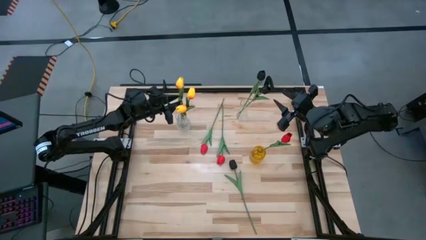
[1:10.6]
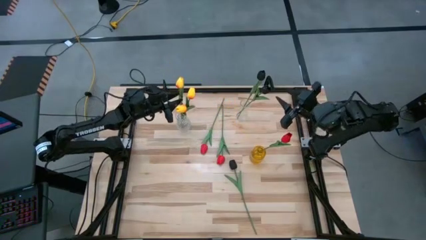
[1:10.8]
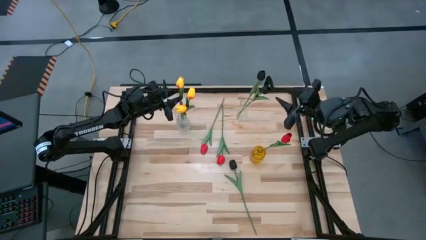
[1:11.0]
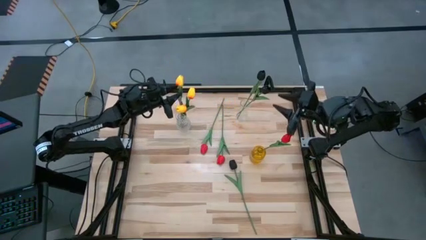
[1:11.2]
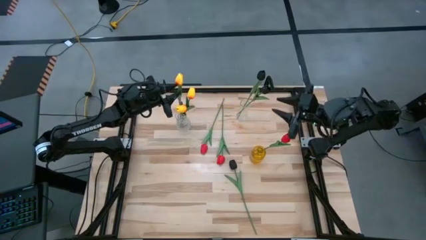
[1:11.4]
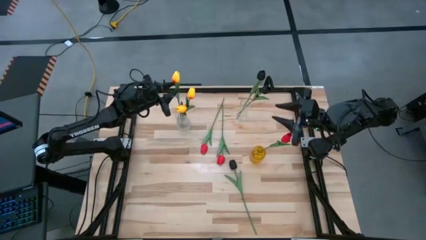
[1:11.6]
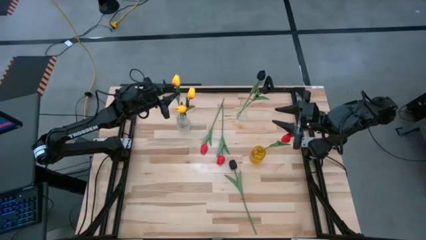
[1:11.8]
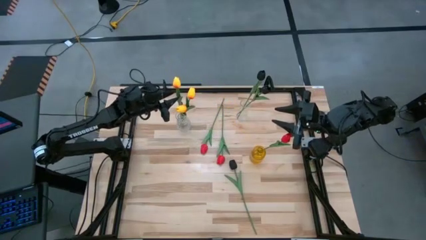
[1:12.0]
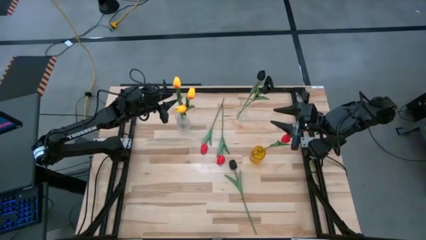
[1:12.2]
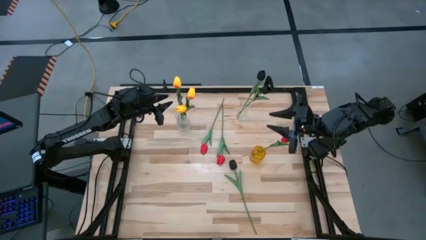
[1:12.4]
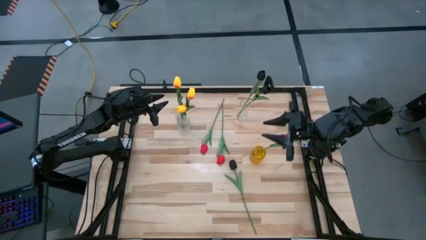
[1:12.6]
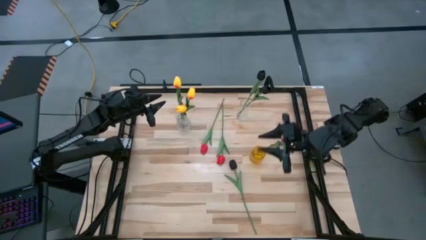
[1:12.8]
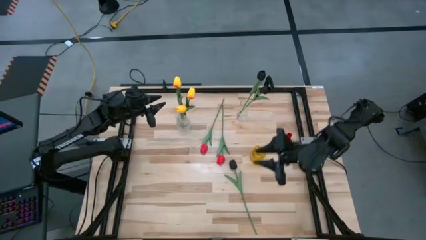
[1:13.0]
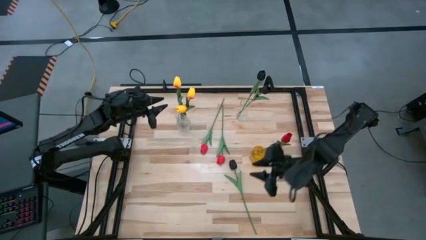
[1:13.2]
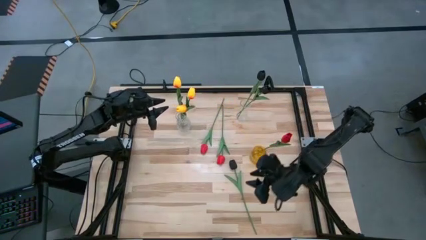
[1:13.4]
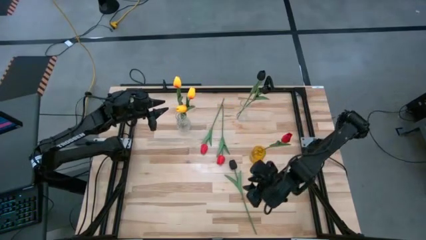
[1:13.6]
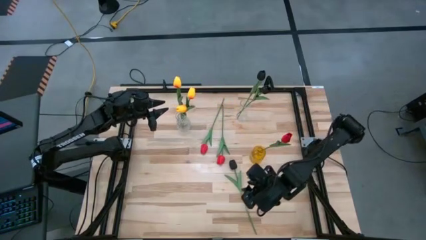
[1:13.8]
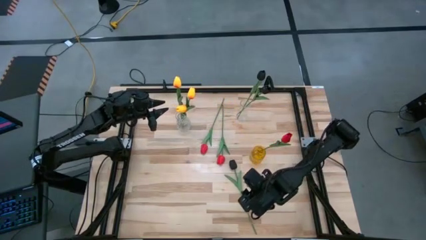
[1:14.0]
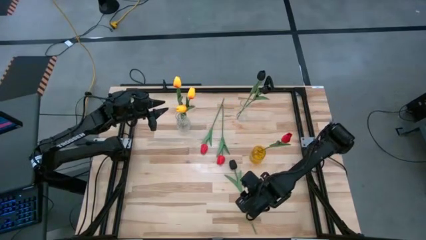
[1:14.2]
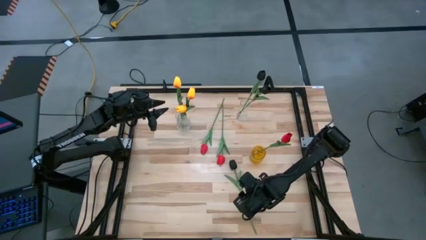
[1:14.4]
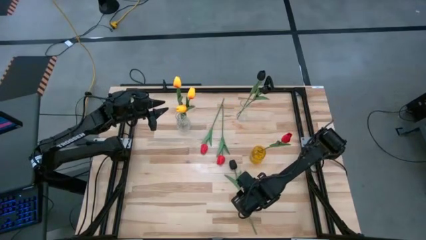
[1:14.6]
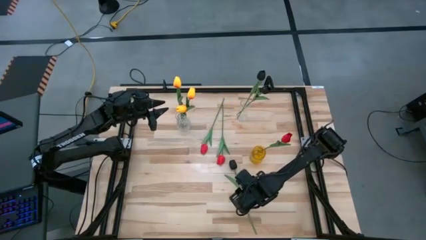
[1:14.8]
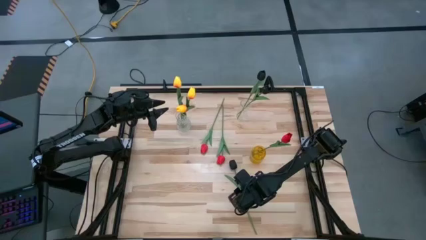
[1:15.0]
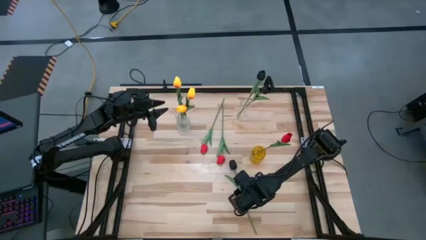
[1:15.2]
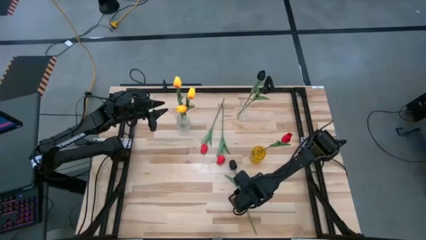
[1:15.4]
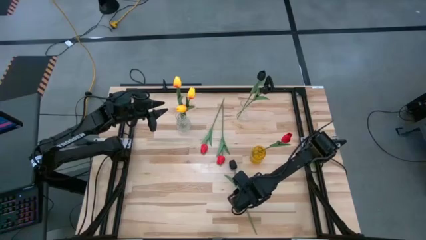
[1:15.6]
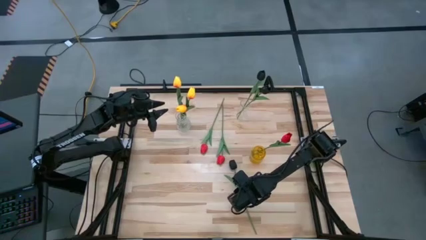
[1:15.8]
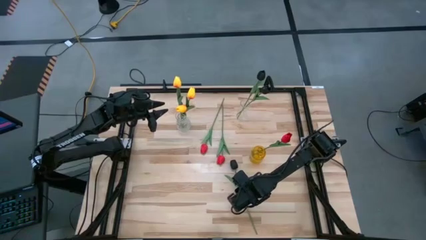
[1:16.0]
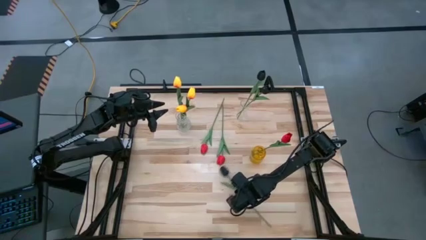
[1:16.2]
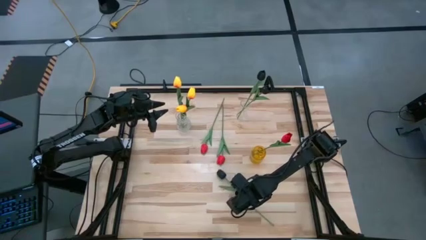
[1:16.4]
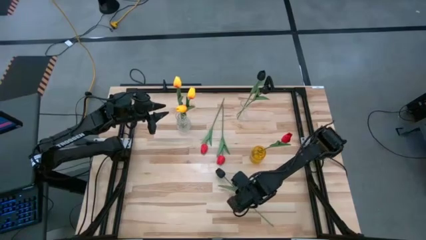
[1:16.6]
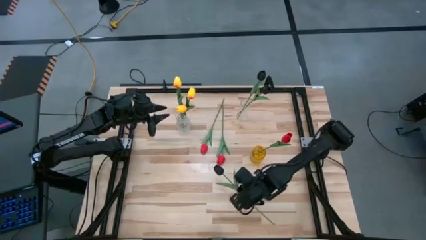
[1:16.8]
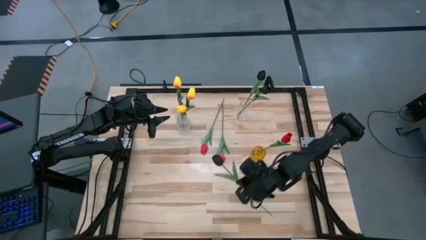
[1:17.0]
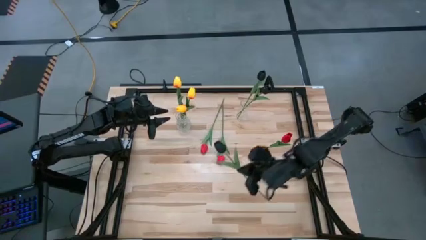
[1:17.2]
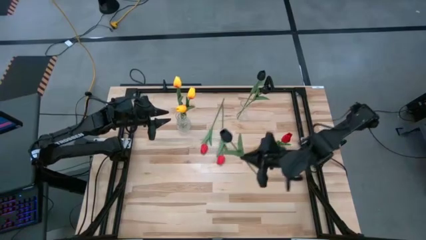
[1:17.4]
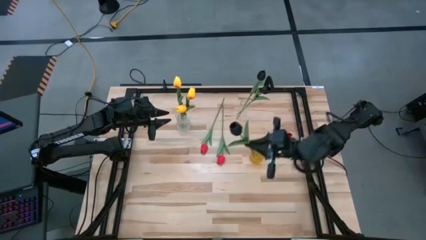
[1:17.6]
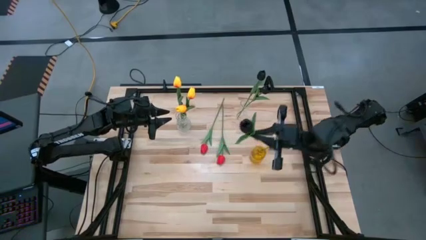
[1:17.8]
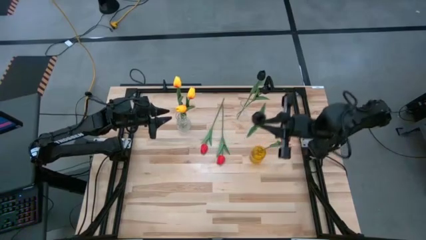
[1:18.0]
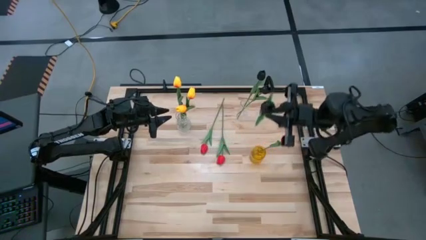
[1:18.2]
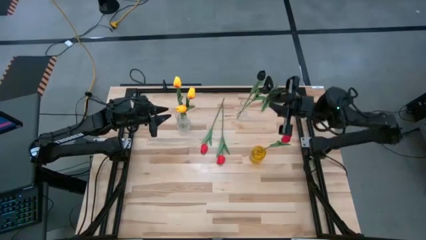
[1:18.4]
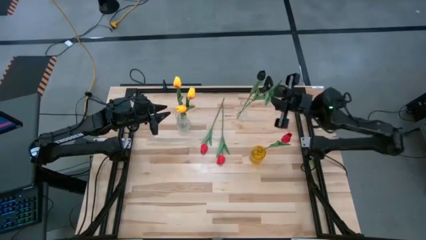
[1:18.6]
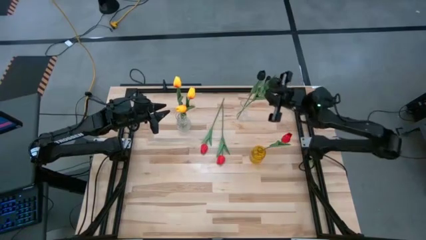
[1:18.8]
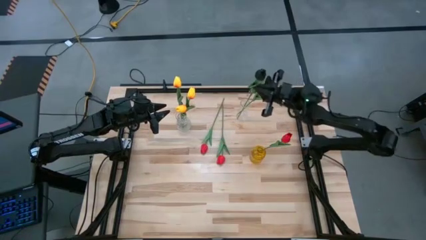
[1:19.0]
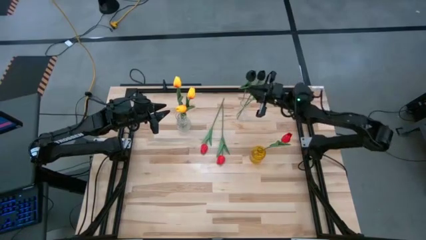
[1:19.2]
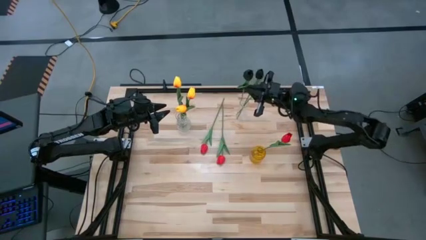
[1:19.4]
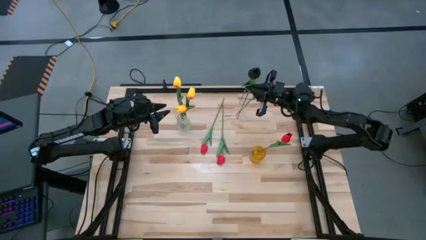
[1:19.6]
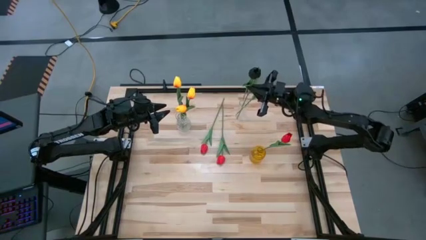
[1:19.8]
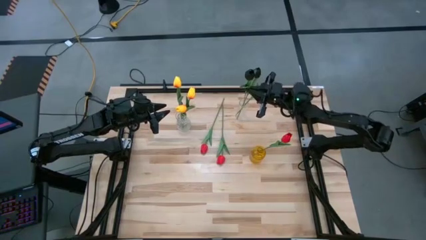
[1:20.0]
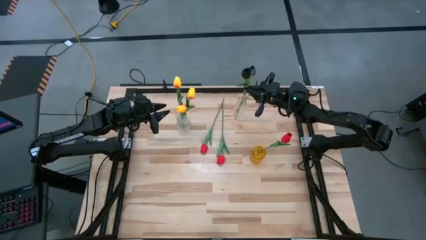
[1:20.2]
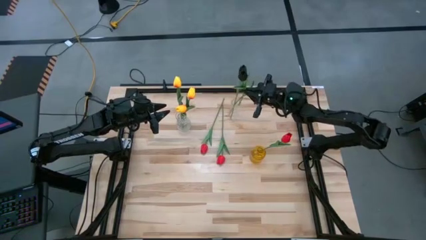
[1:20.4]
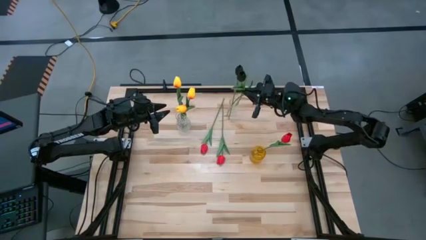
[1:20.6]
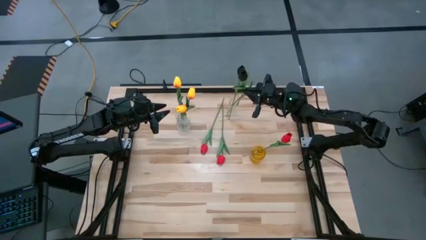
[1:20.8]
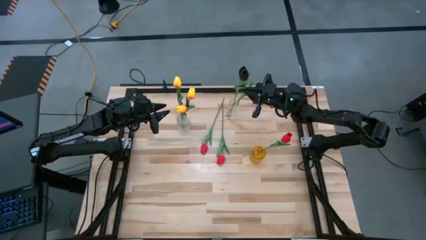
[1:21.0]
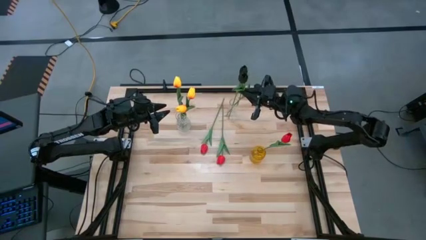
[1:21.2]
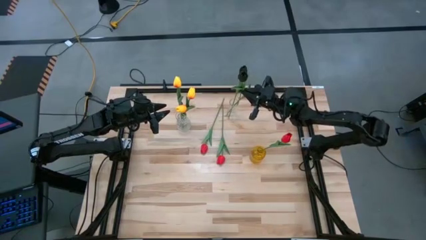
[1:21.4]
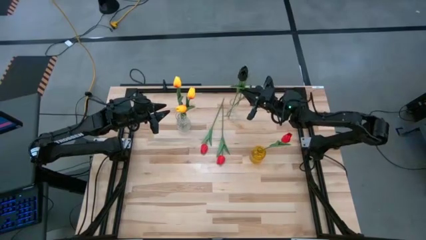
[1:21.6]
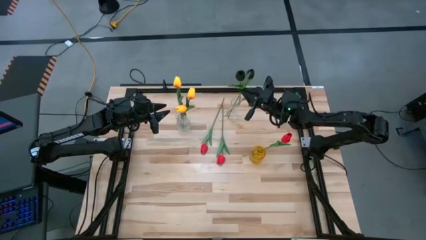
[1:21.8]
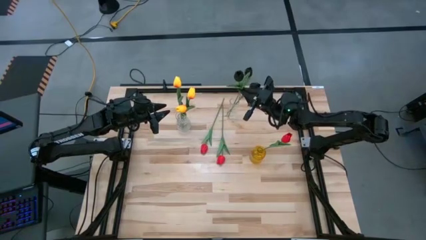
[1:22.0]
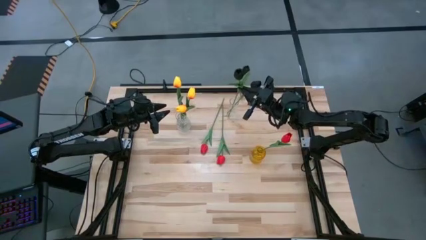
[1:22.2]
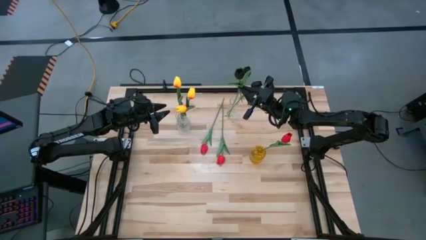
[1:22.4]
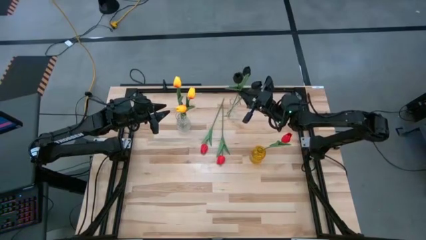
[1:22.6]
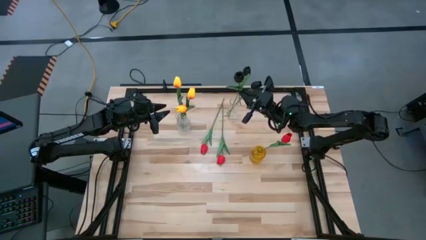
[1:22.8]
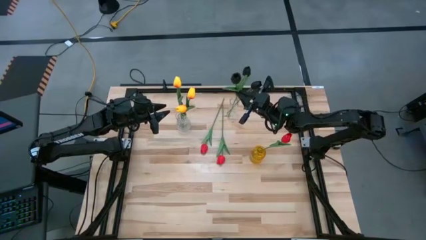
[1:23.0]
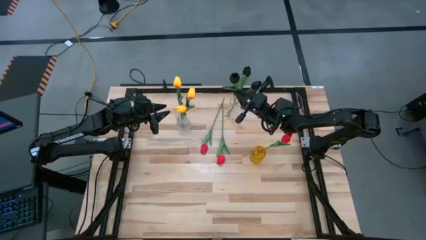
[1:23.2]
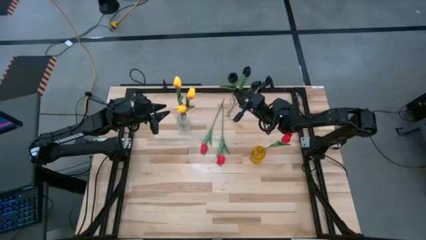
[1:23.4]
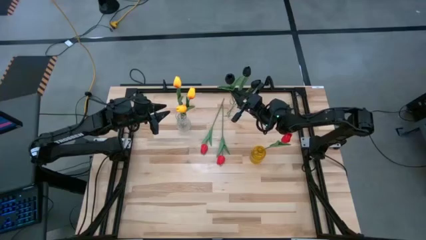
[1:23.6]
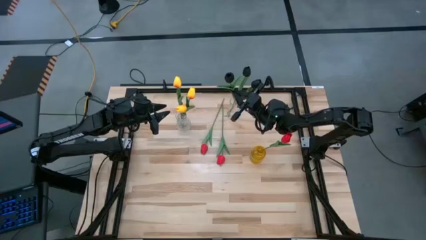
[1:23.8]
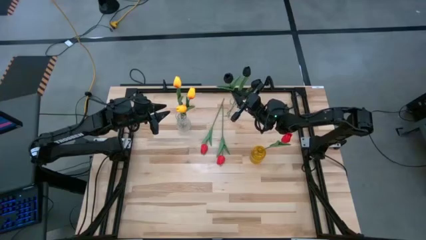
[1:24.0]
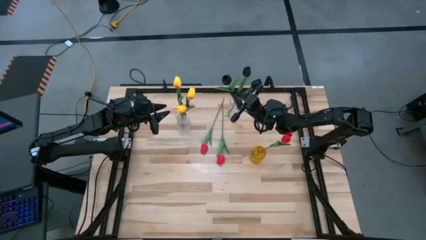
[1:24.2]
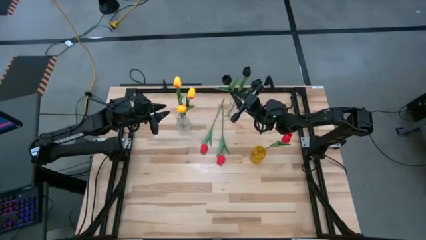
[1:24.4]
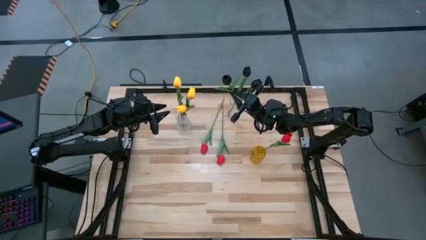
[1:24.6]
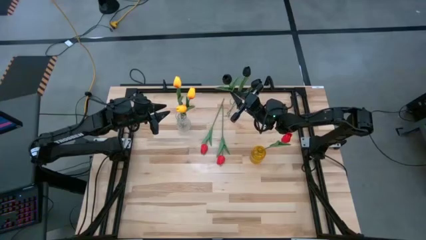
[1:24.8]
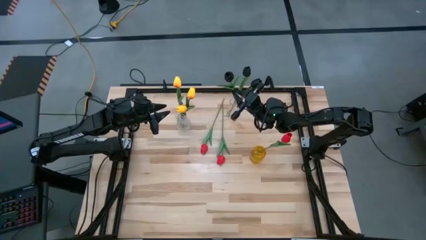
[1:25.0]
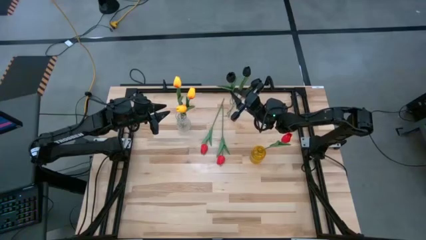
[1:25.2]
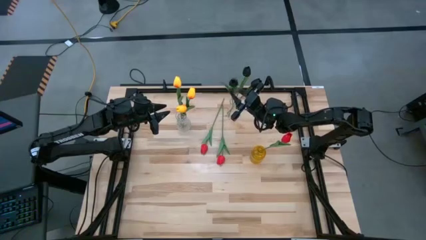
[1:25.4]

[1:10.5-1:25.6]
Task: Sort flowers into vase by color
Put the black tulip into the right transparent vase
